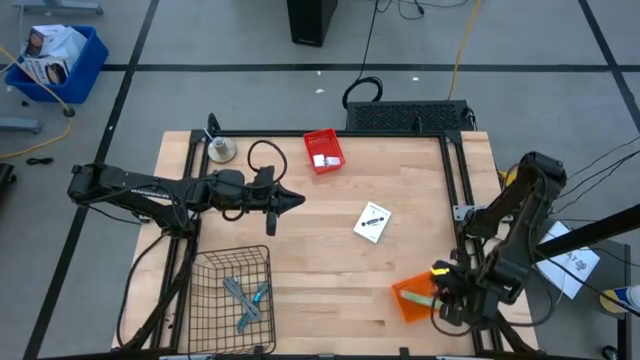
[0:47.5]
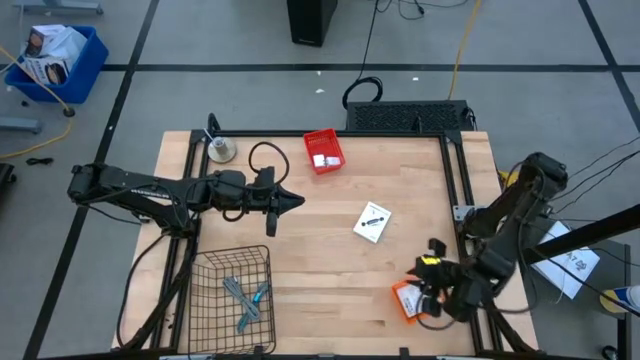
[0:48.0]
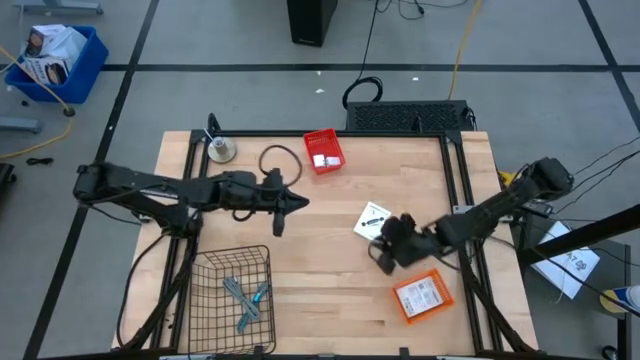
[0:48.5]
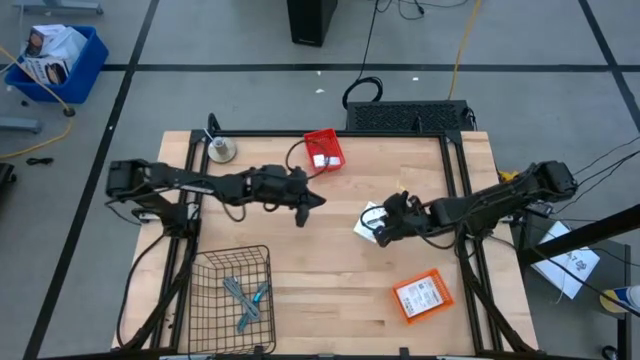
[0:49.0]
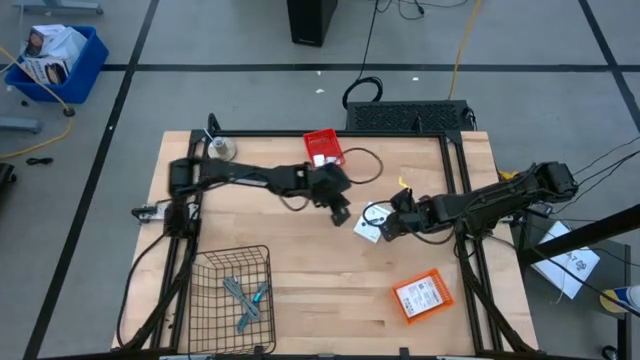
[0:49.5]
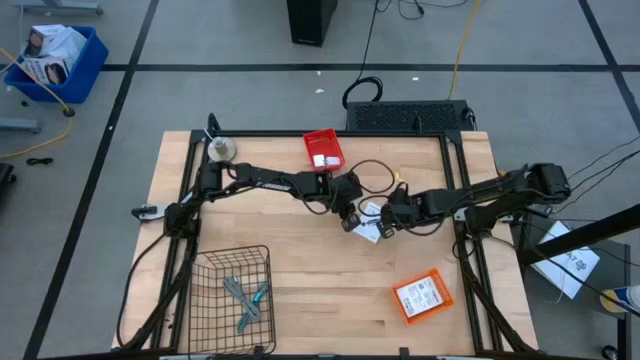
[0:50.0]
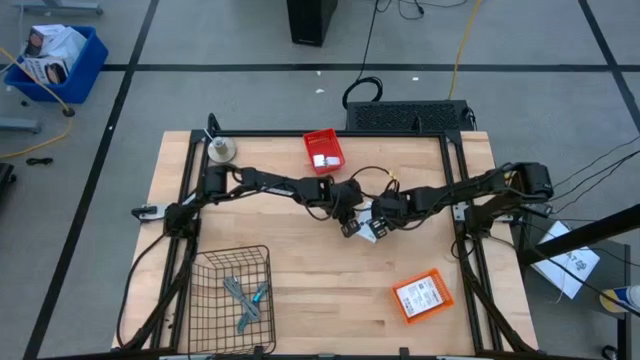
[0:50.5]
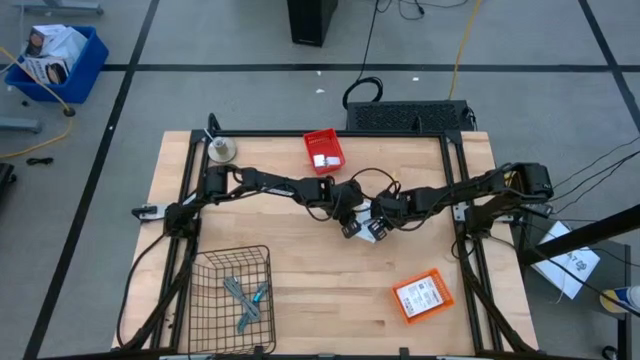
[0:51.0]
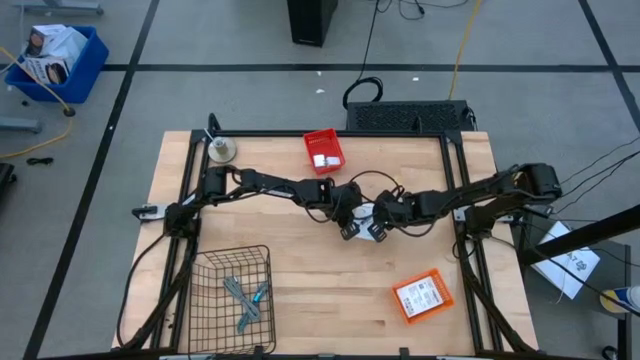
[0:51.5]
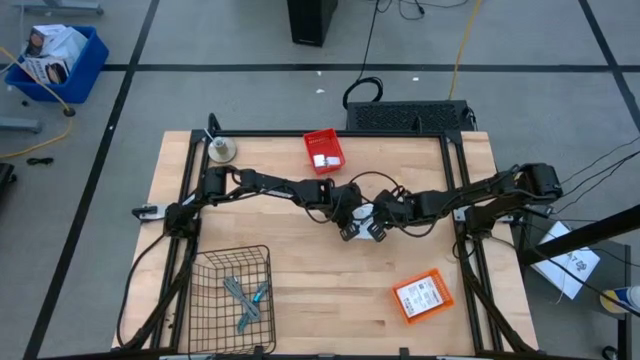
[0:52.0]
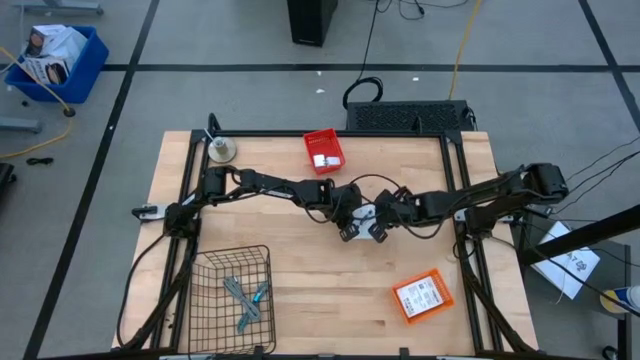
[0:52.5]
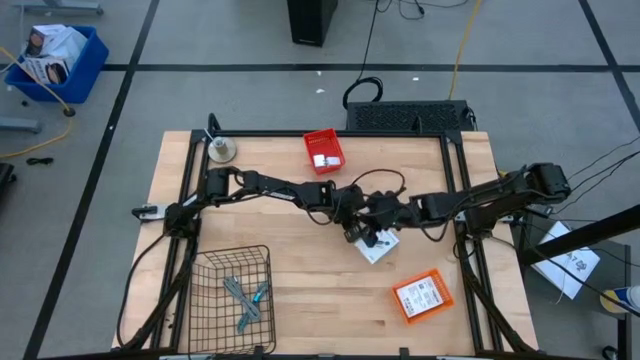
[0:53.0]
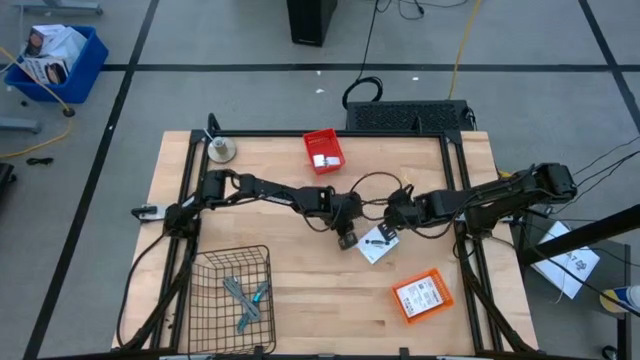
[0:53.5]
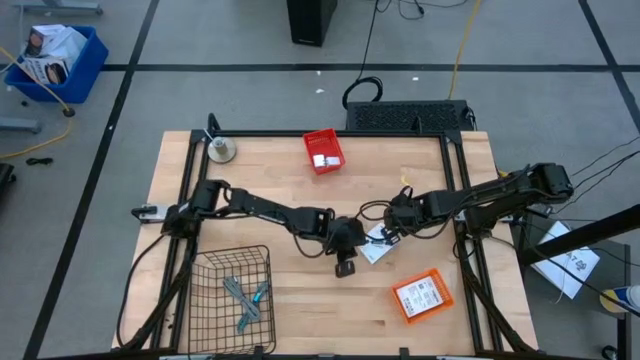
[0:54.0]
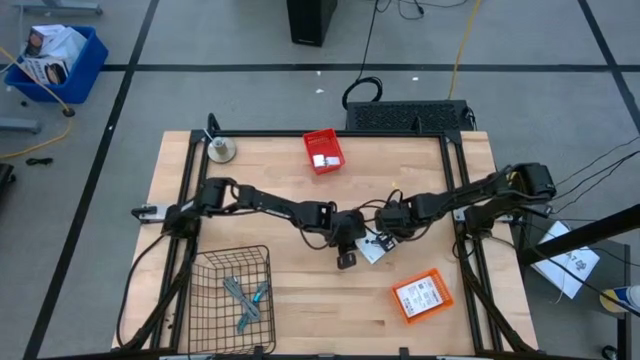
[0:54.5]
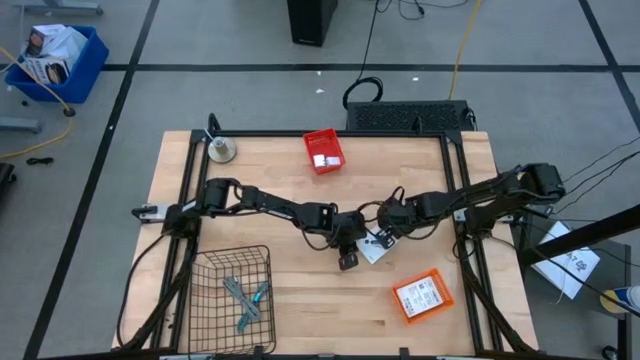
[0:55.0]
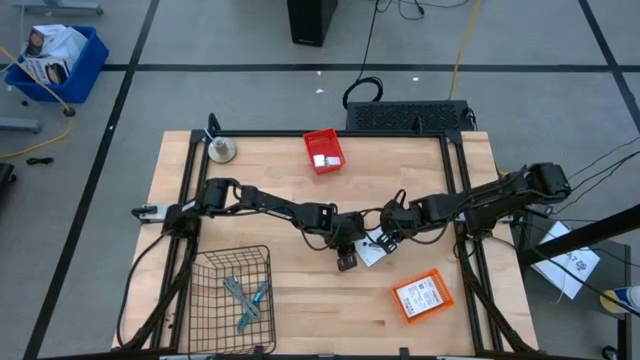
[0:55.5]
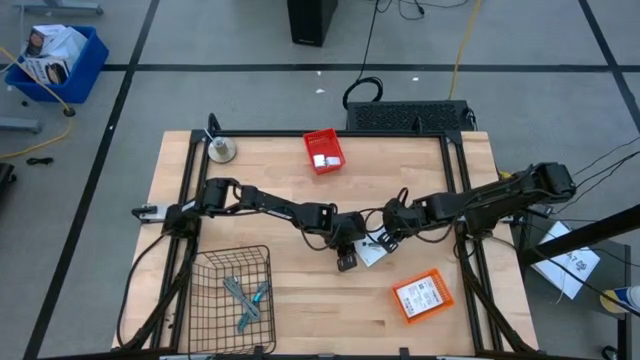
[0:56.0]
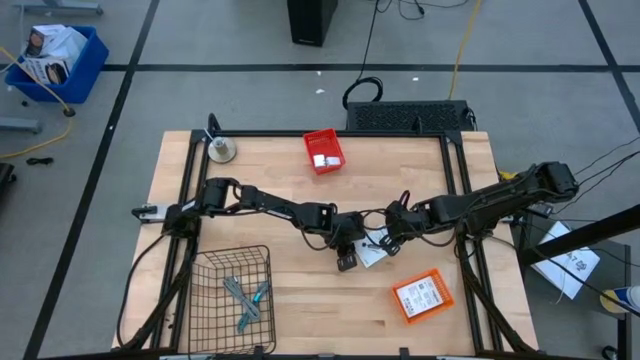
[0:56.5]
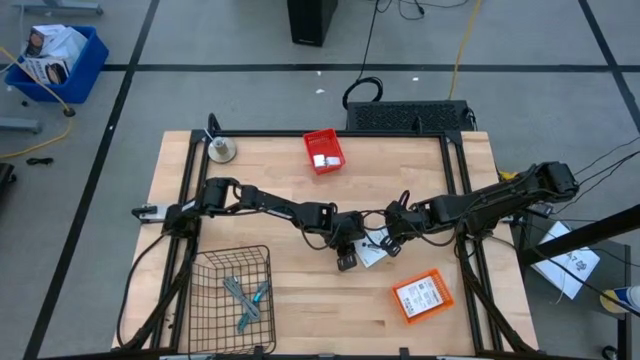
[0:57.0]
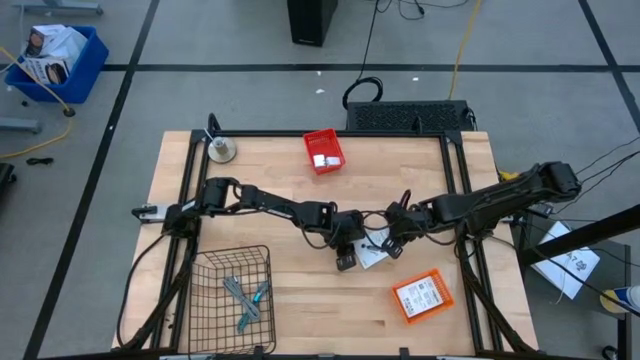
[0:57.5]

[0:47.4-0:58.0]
Task: Pick and place items into bin
Put the white card reader box into the orange basket

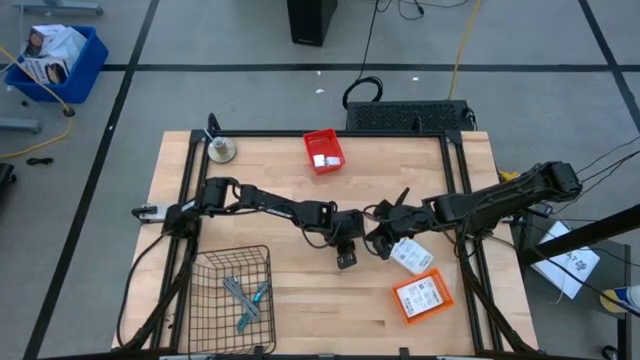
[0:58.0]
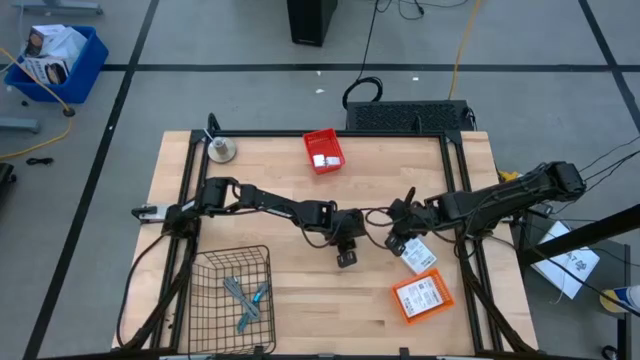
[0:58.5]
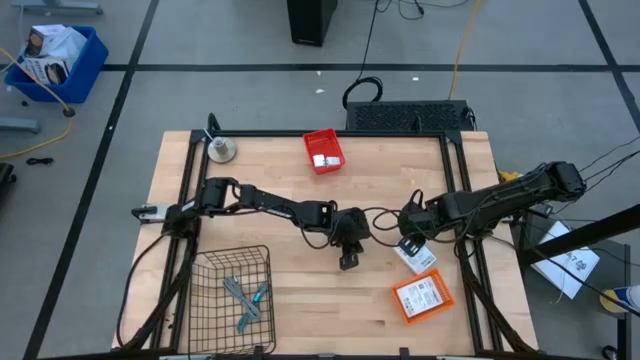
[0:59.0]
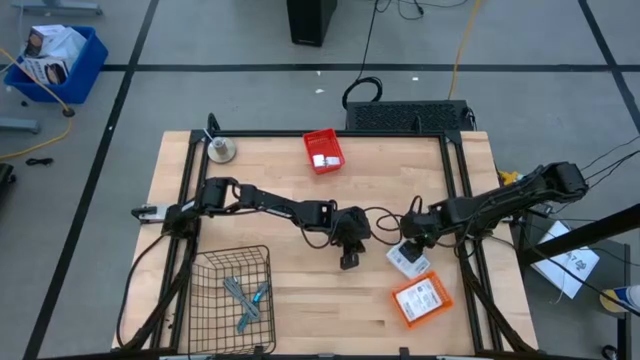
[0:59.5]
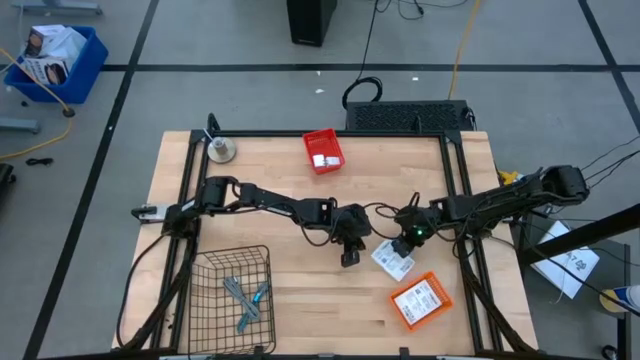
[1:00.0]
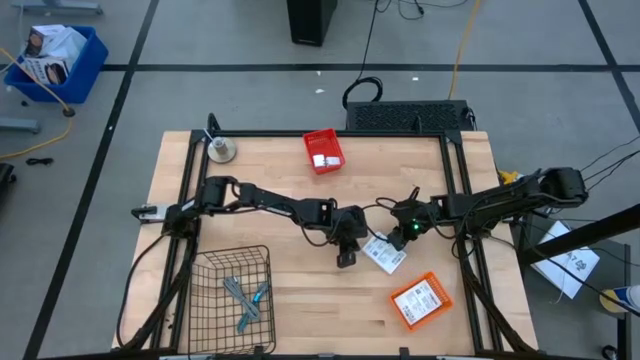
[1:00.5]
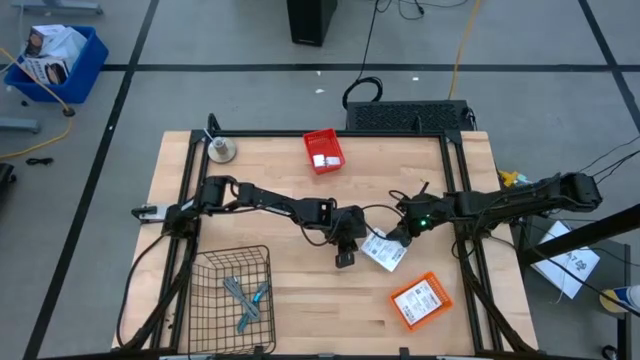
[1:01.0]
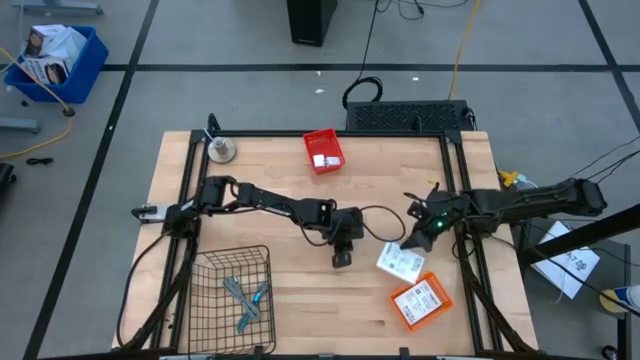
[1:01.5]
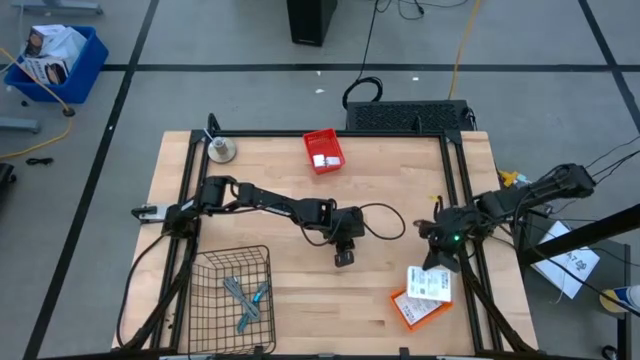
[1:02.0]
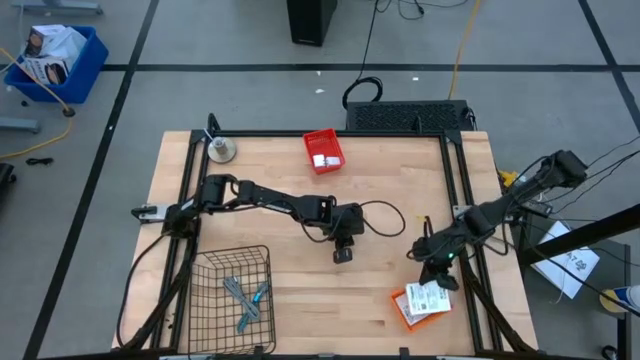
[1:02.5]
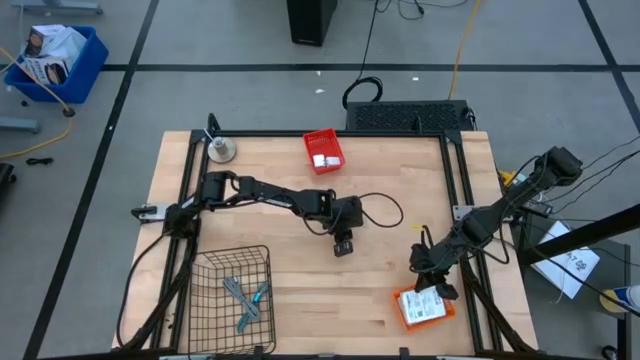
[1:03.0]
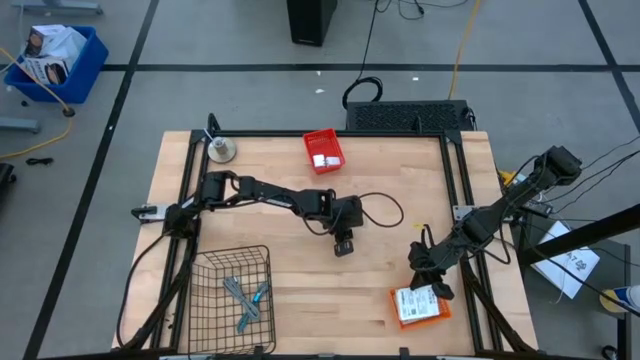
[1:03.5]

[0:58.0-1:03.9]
Put the white card reader box into the orange basket

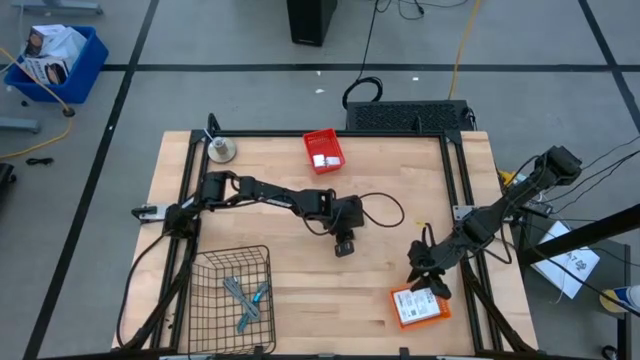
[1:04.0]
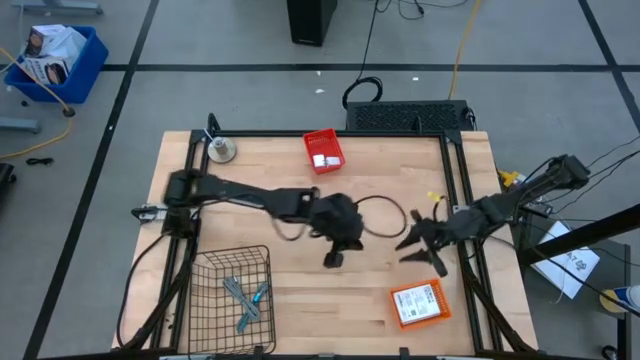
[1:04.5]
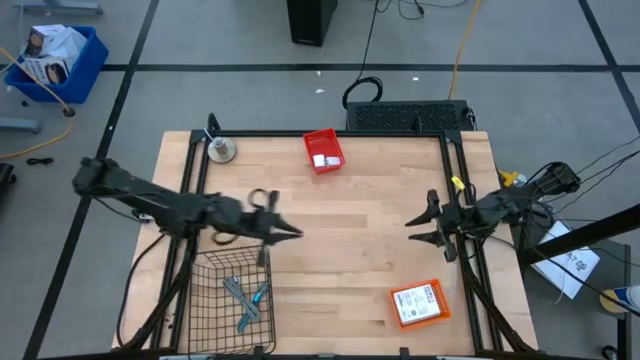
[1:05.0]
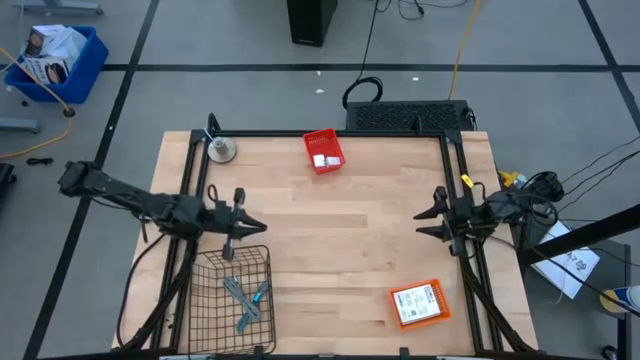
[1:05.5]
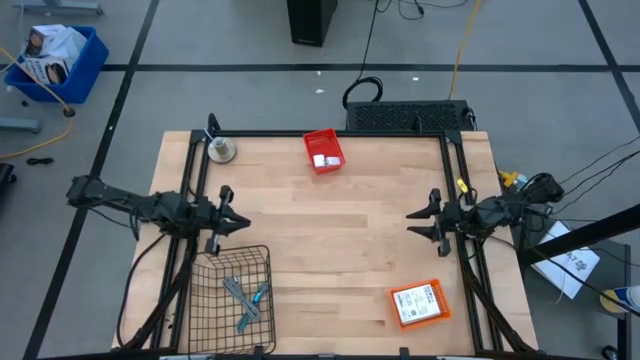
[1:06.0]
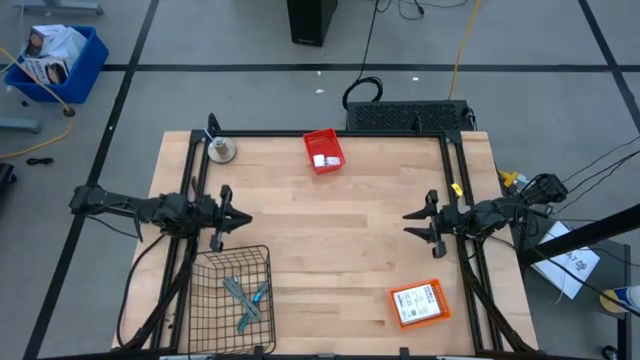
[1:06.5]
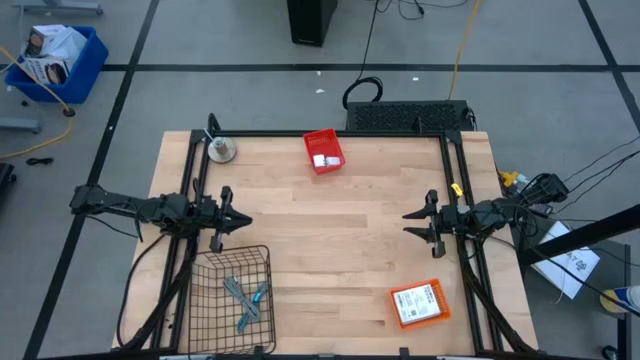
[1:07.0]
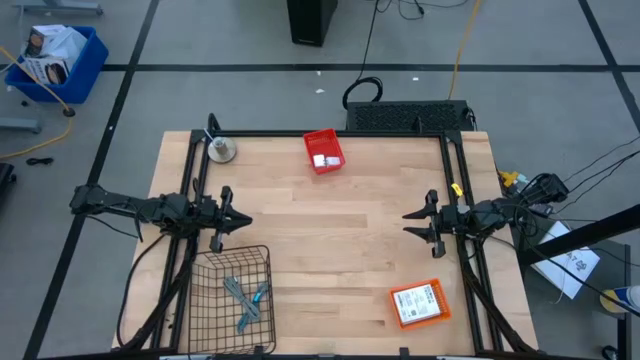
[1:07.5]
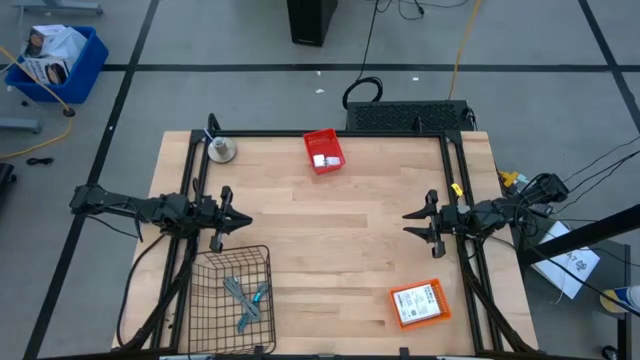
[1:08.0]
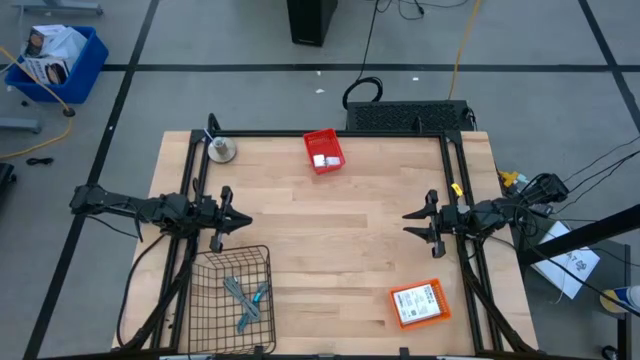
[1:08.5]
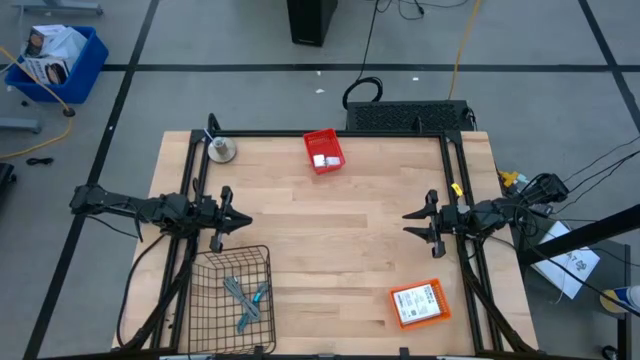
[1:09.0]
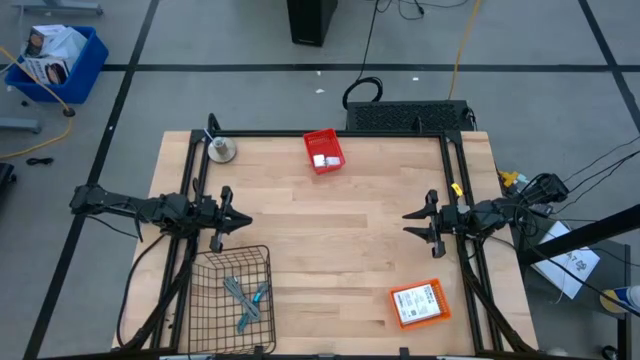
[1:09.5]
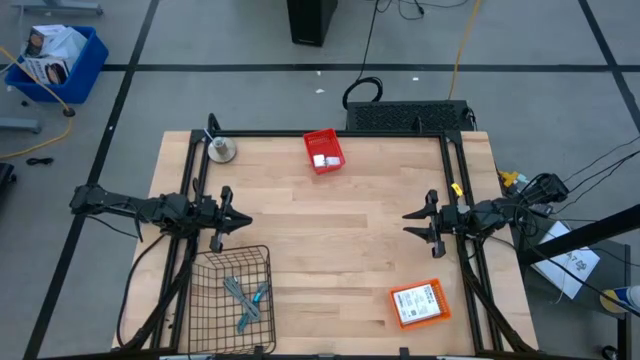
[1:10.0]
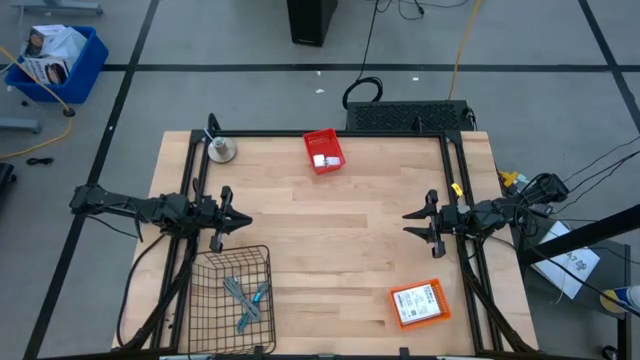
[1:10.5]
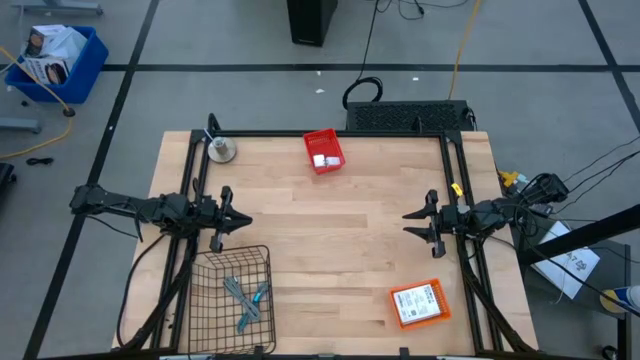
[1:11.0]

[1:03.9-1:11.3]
Return to Home Position
